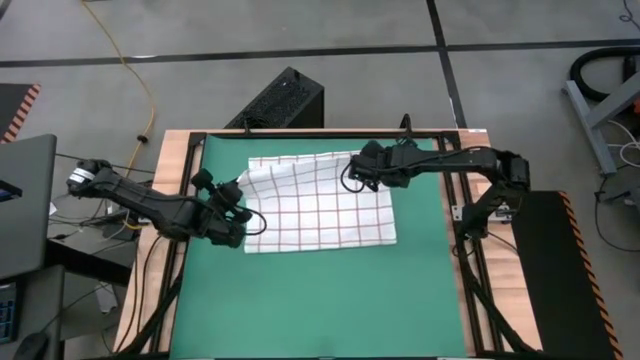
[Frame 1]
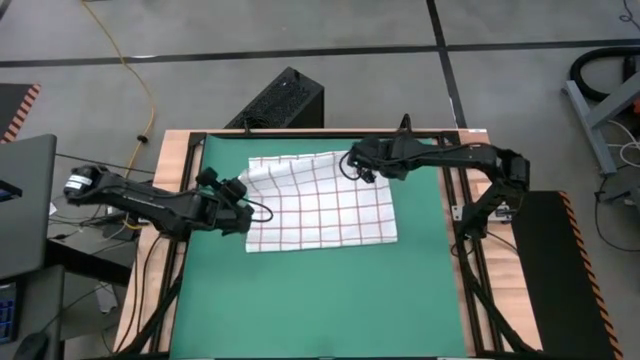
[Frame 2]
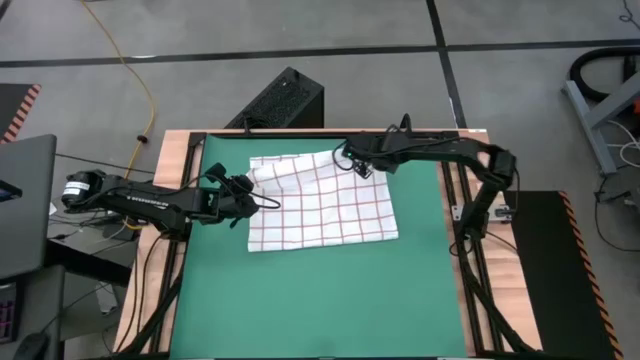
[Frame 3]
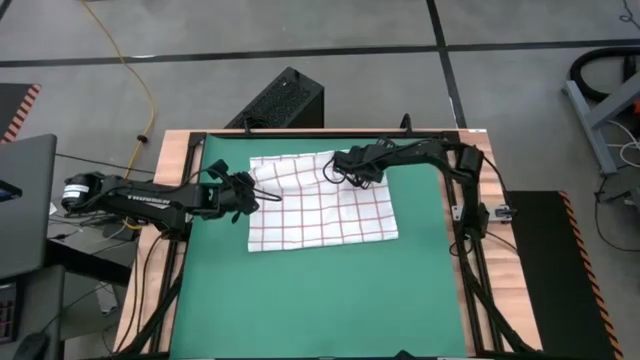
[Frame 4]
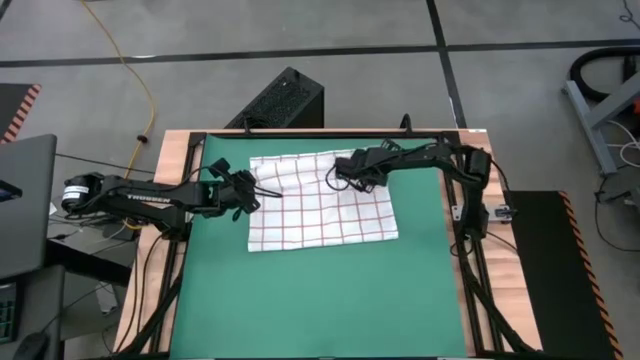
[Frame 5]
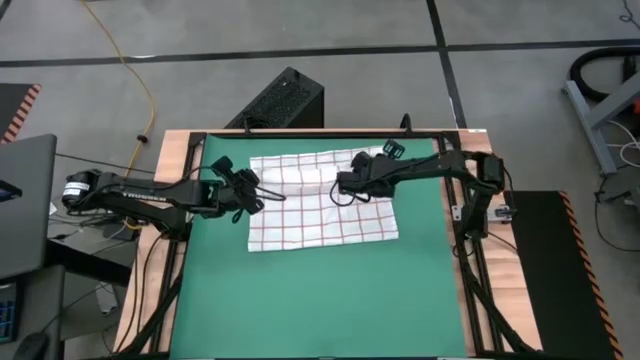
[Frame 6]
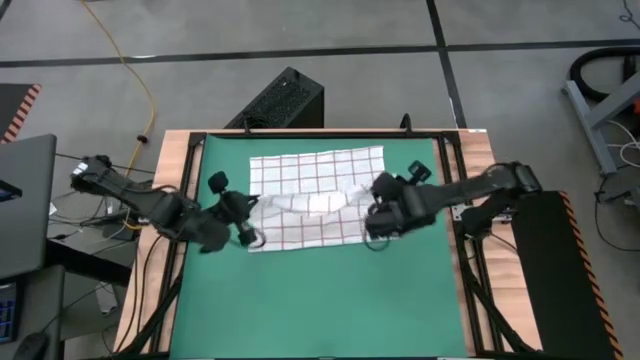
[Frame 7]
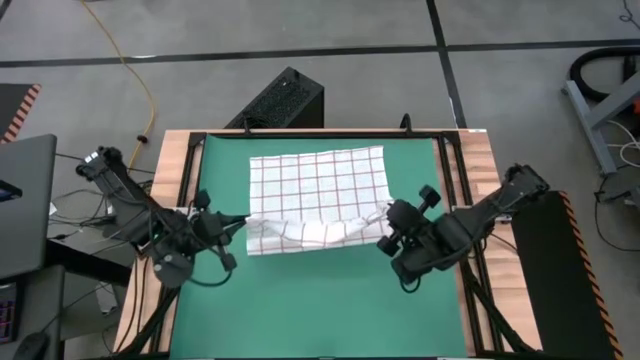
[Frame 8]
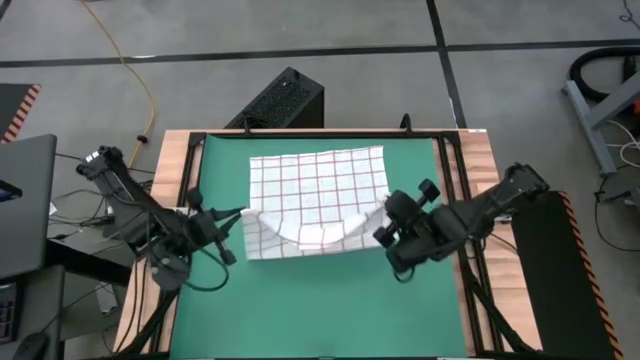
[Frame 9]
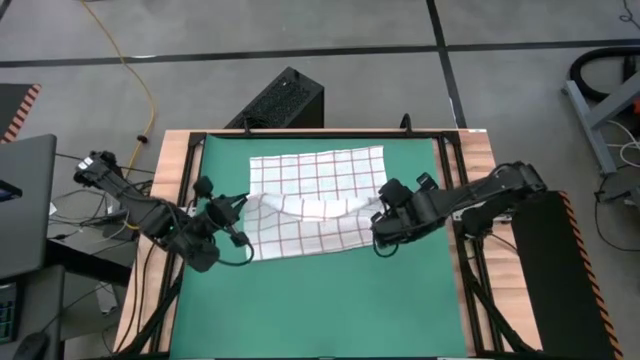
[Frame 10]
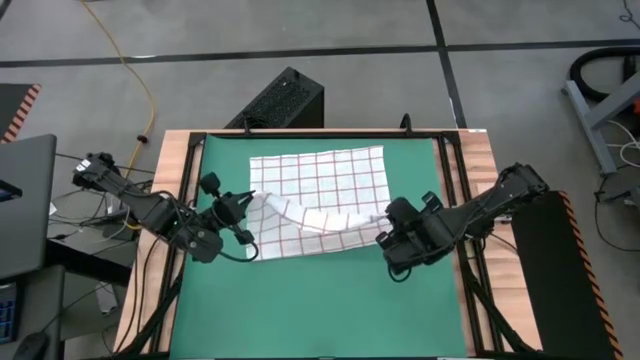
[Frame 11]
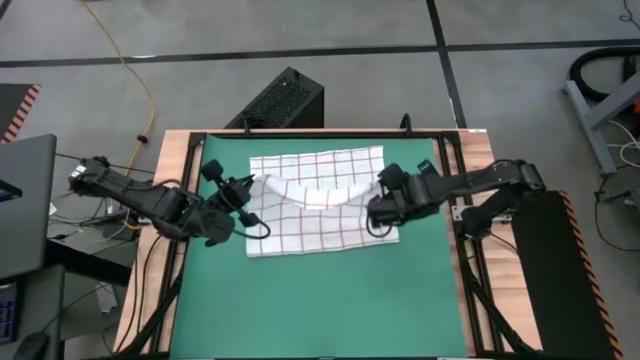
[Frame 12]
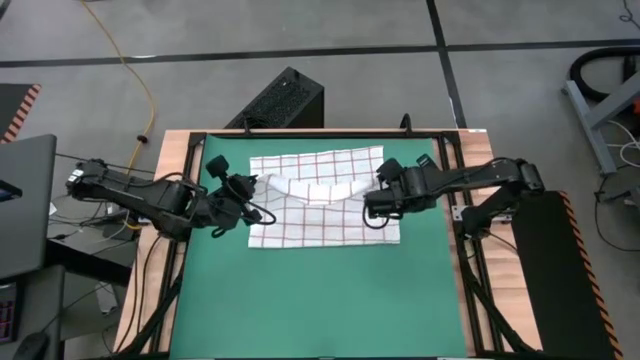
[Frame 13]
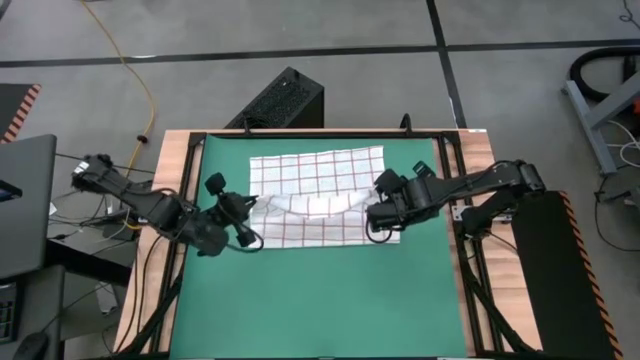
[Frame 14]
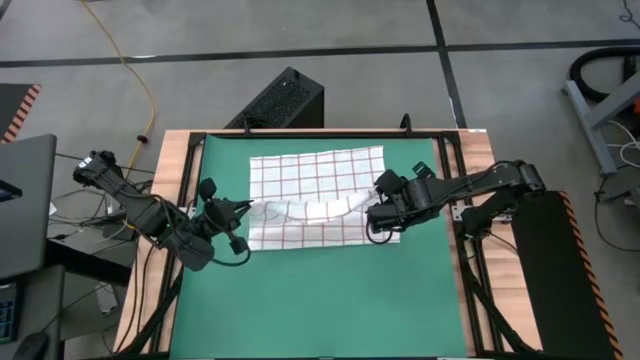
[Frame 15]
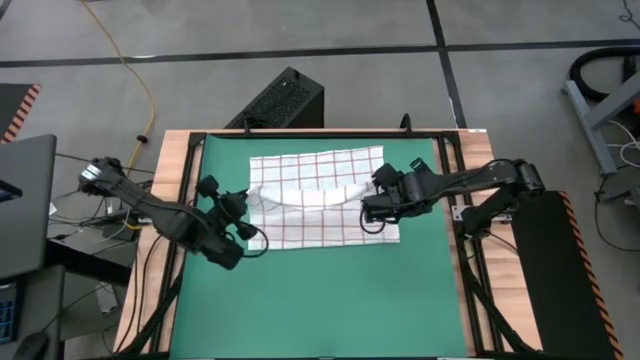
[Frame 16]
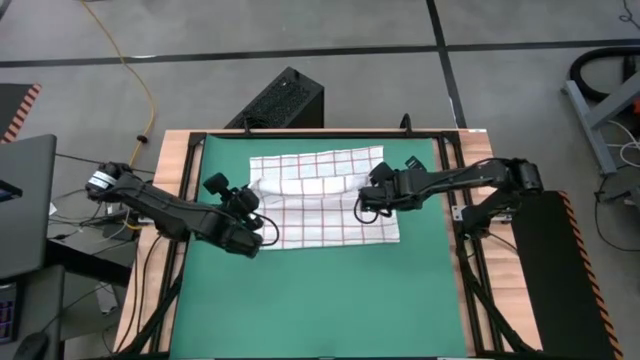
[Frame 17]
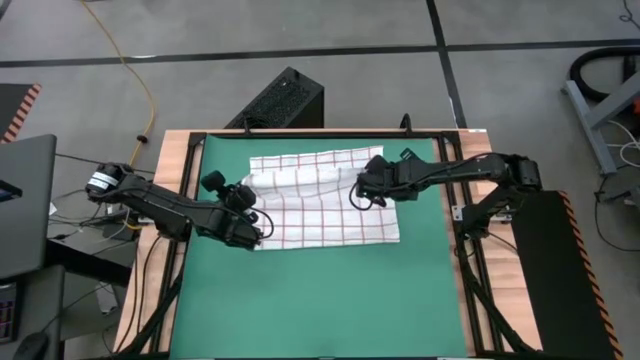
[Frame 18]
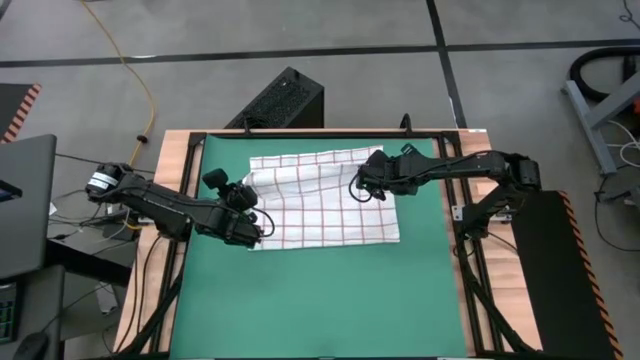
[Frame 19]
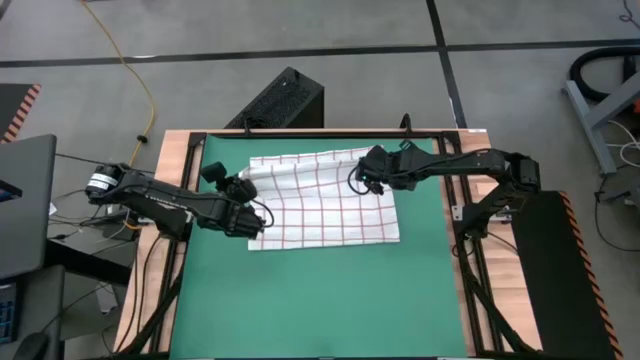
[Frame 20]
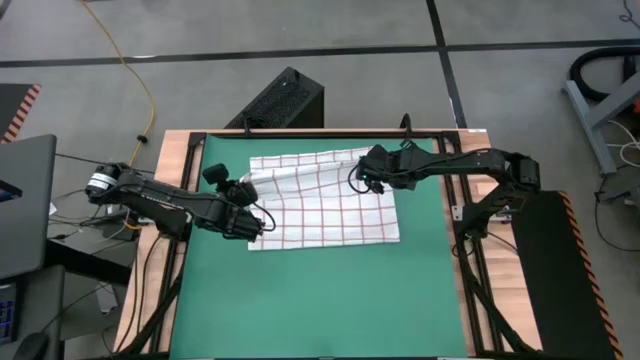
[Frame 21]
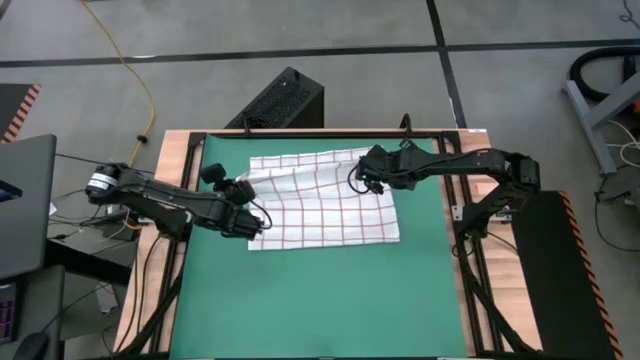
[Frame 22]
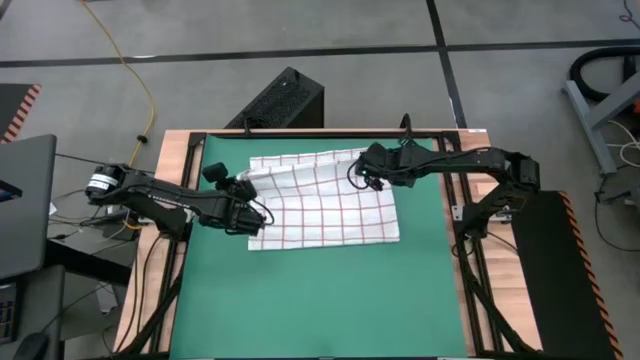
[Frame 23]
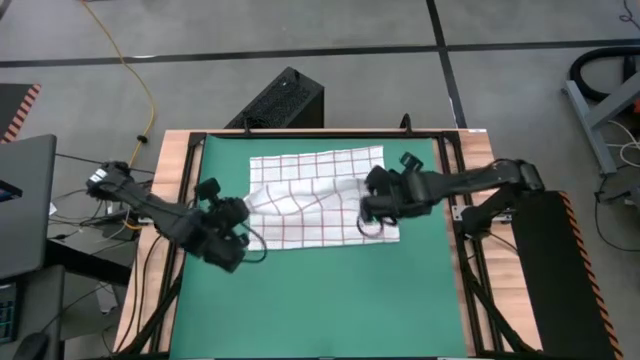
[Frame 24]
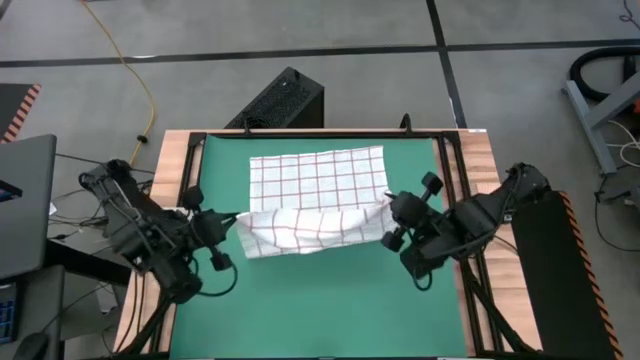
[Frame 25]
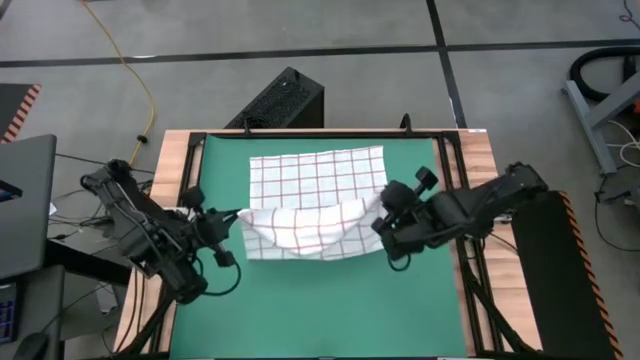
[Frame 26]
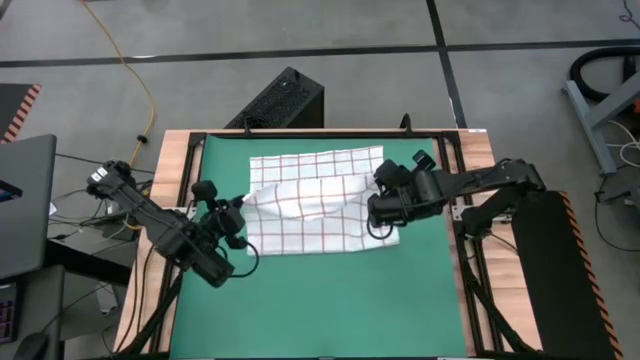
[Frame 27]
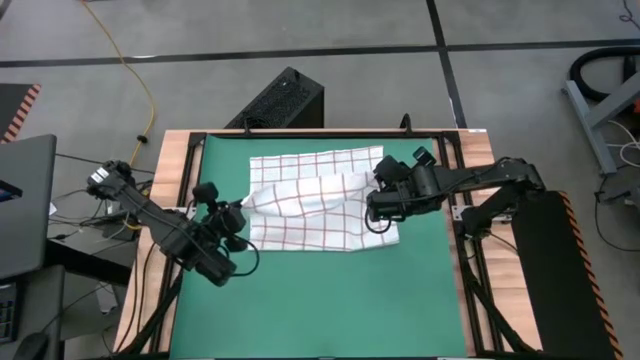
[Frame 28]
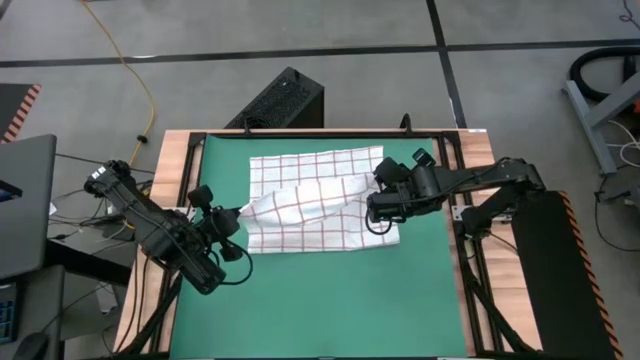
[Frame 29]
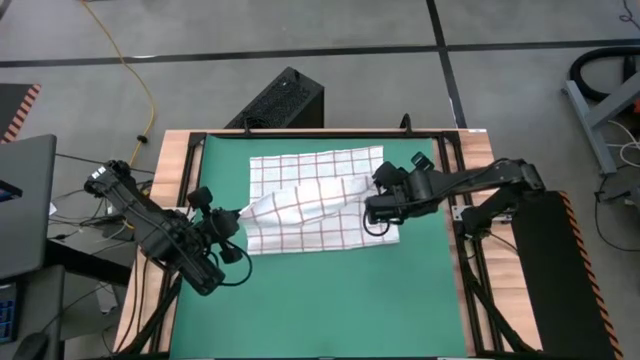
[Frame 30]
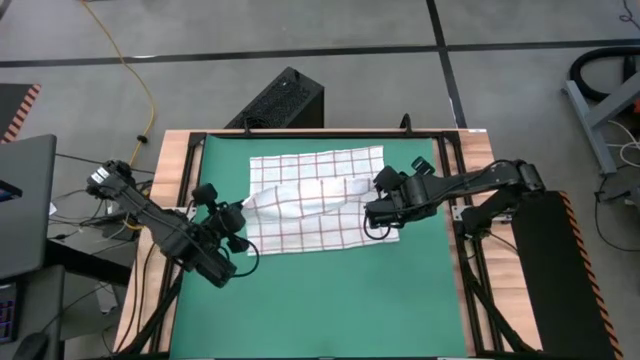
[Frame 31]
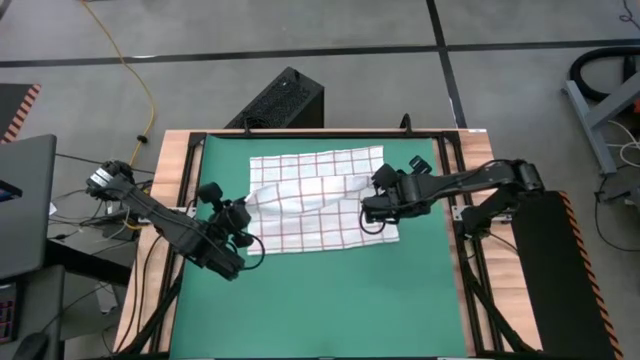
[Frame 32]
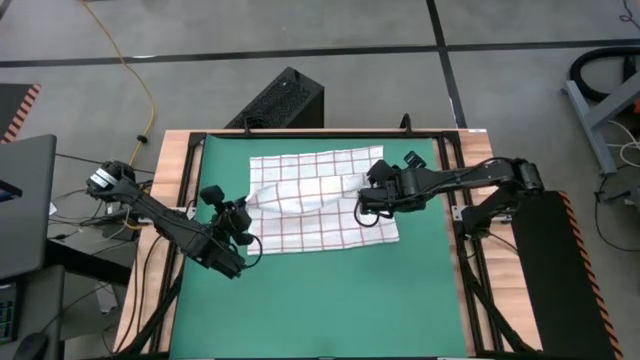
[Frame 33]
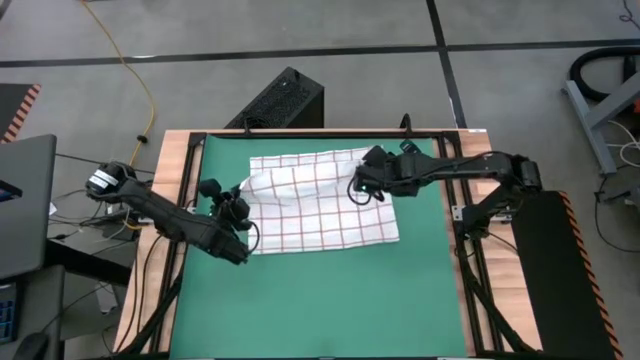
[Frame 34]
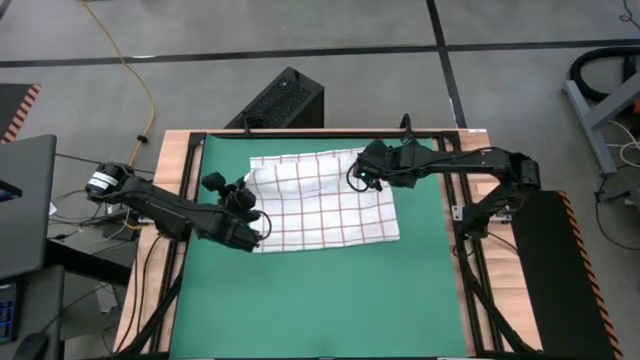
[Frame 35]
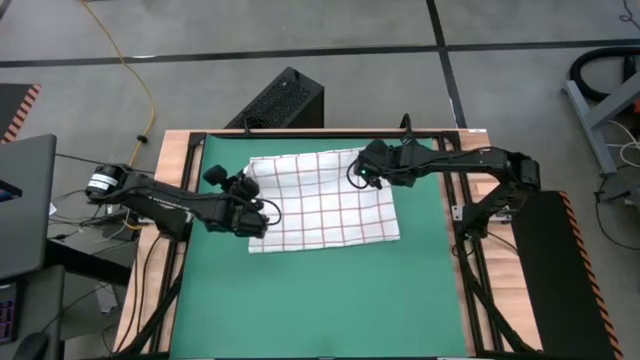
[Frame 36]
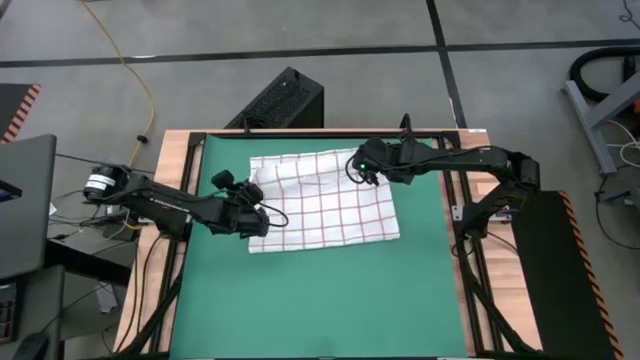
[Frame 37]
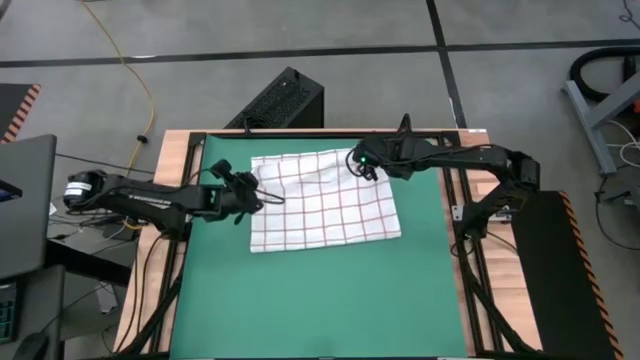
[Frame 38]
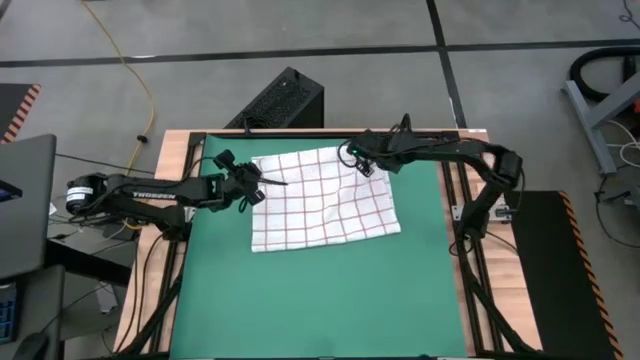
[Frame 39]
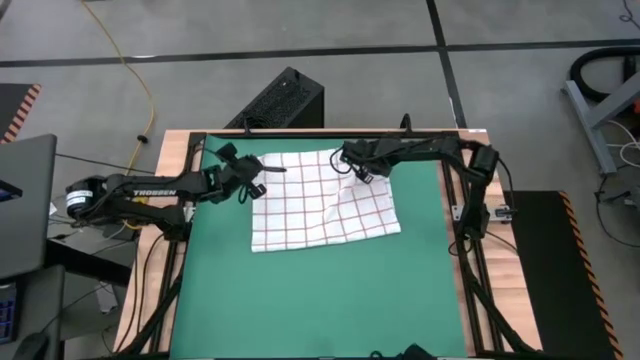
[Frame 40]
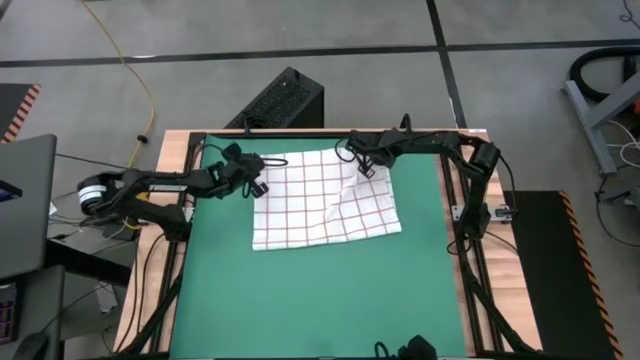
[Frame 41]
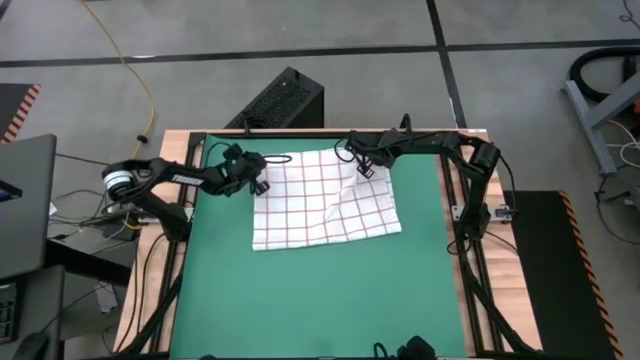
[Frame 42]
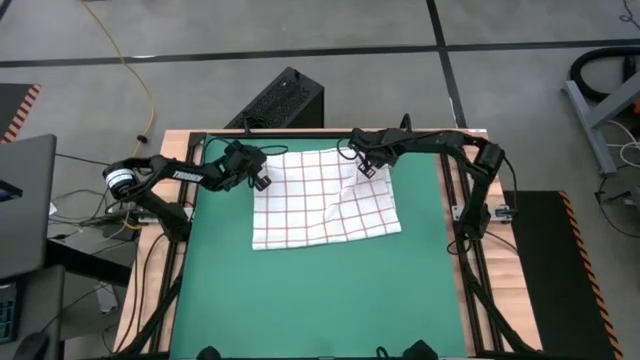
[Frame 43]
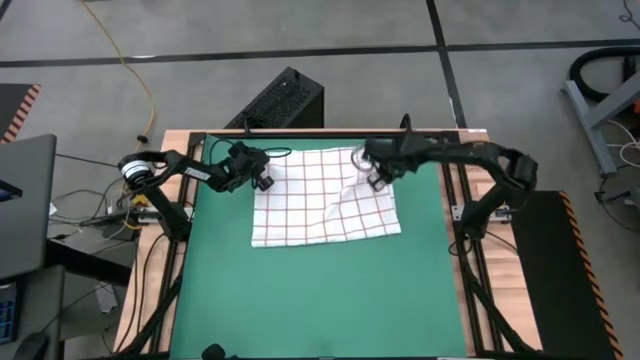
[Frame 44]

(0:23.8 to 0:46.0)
Task: Roll towel into tight, uniform cylinder
Fold the white towel
